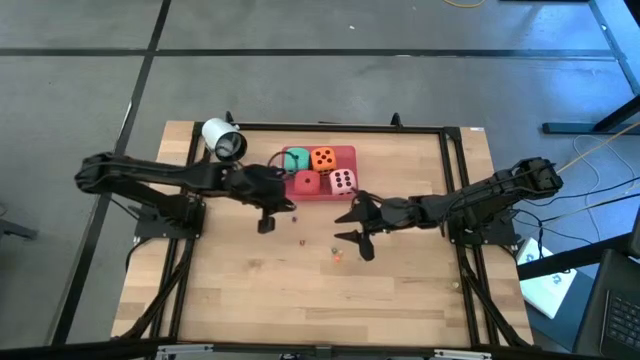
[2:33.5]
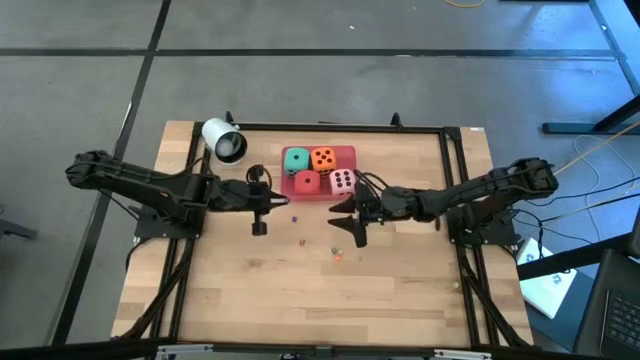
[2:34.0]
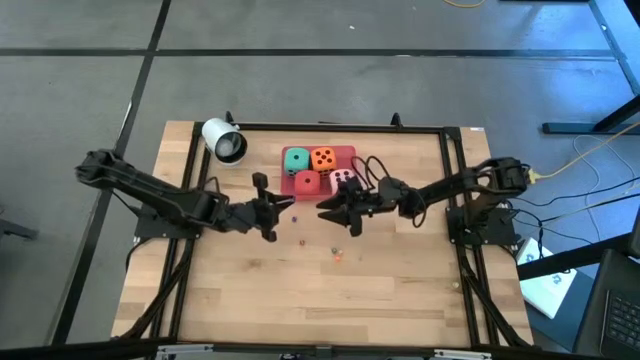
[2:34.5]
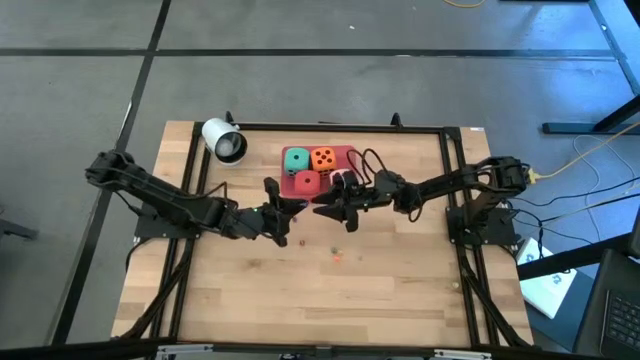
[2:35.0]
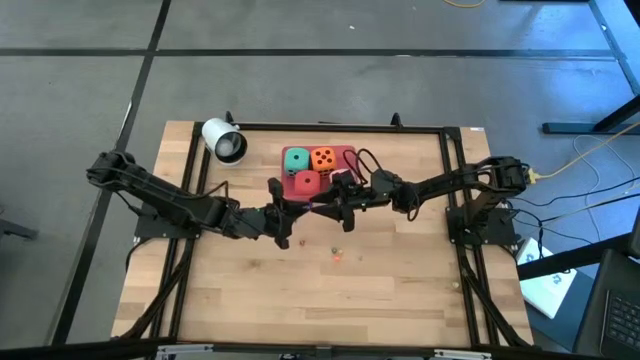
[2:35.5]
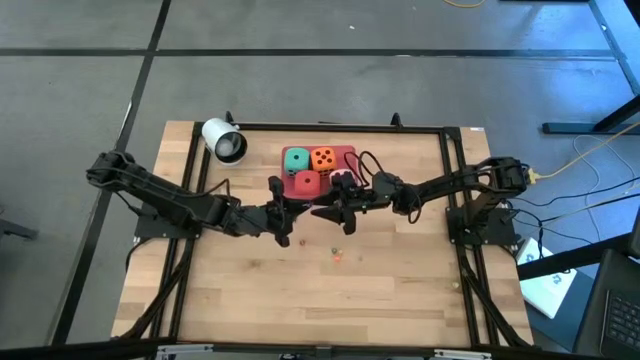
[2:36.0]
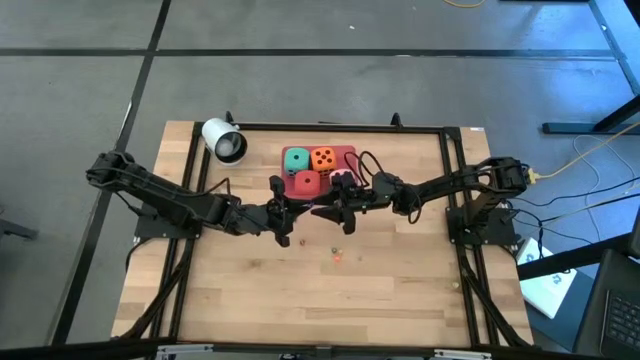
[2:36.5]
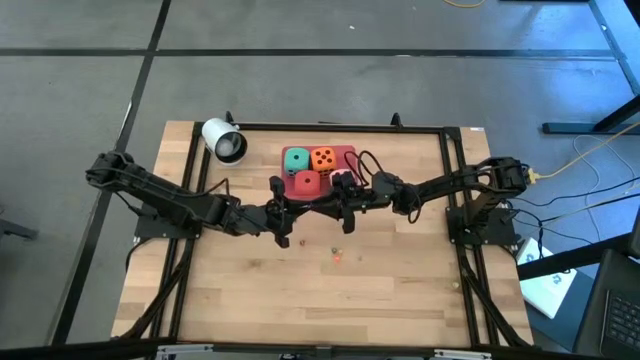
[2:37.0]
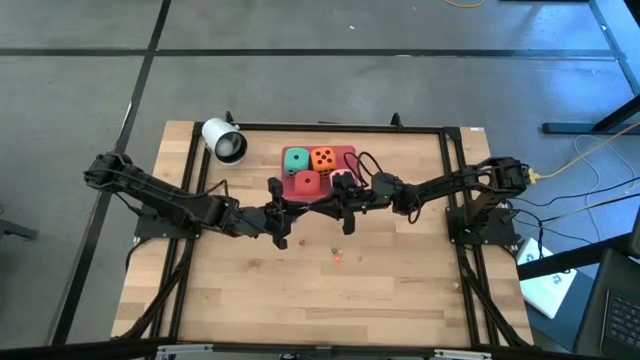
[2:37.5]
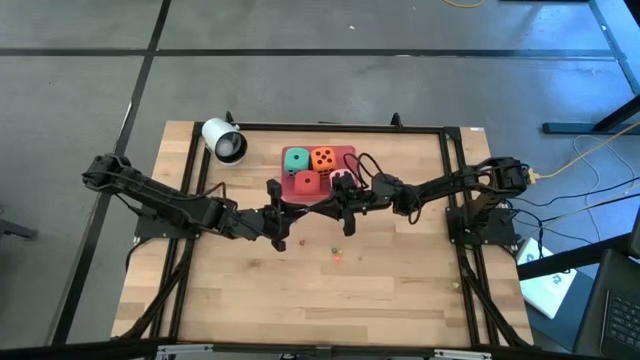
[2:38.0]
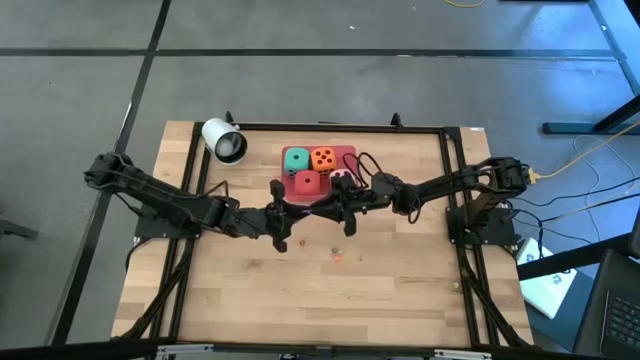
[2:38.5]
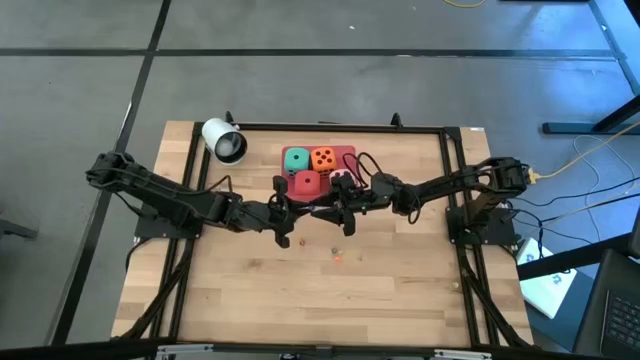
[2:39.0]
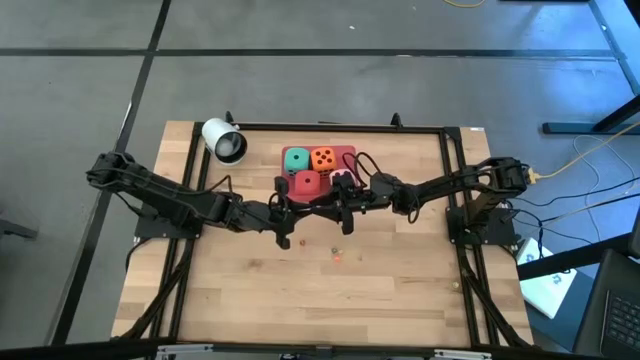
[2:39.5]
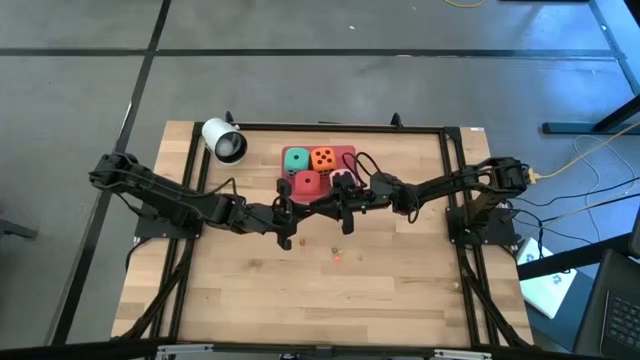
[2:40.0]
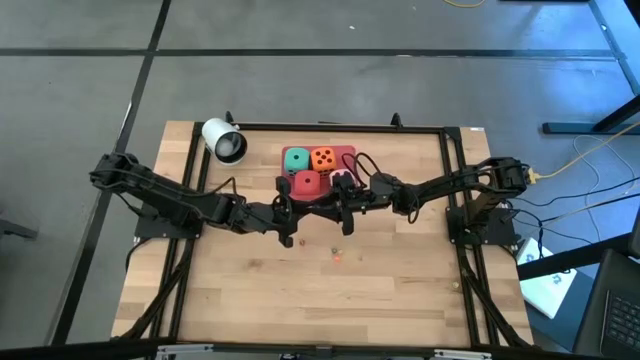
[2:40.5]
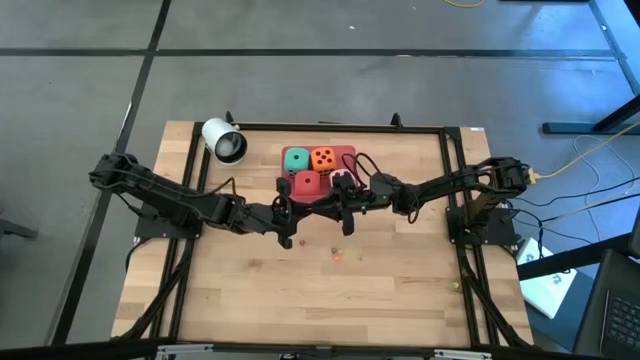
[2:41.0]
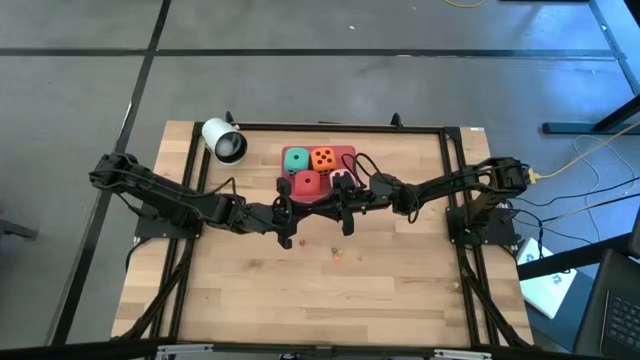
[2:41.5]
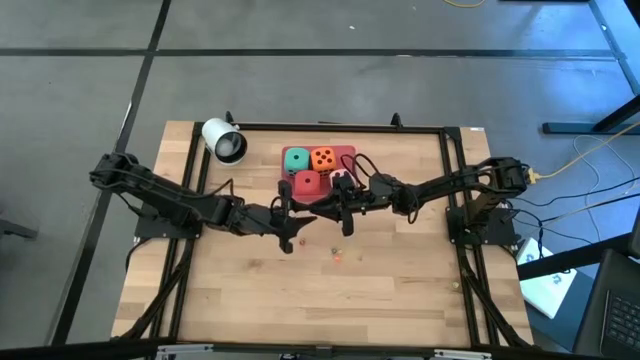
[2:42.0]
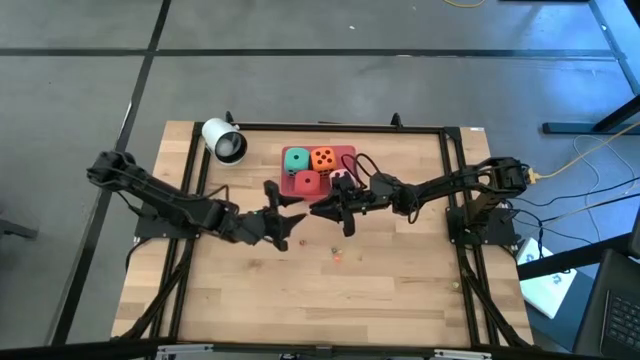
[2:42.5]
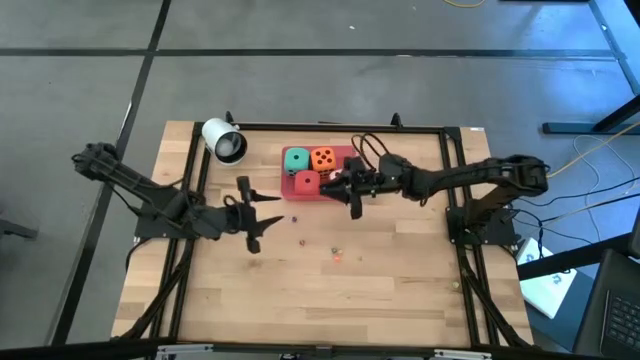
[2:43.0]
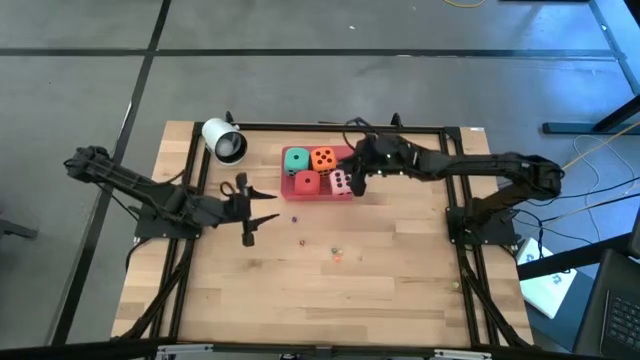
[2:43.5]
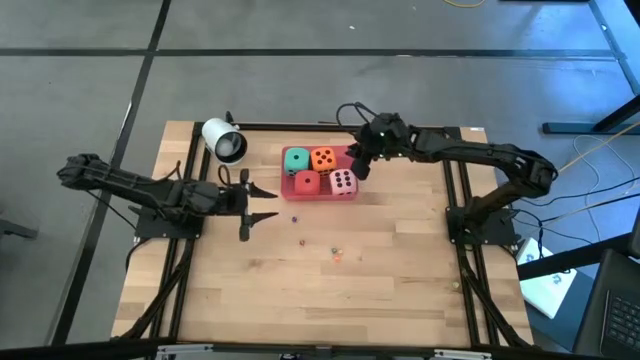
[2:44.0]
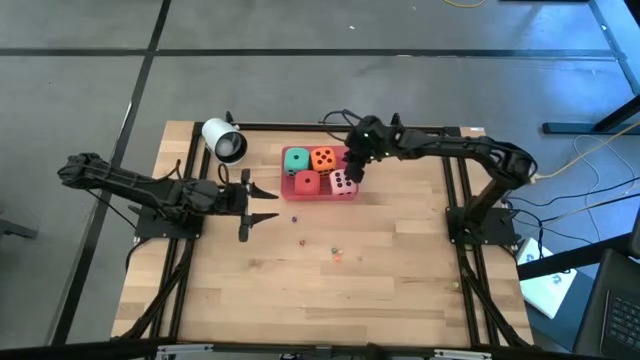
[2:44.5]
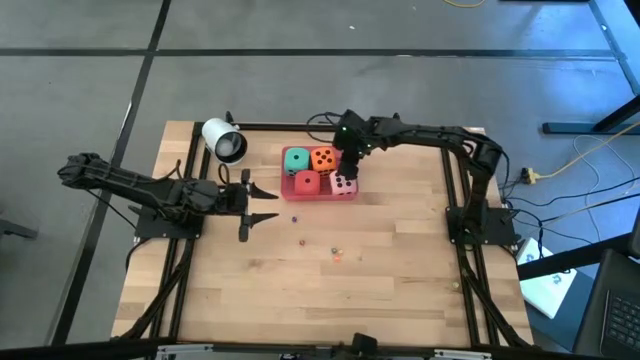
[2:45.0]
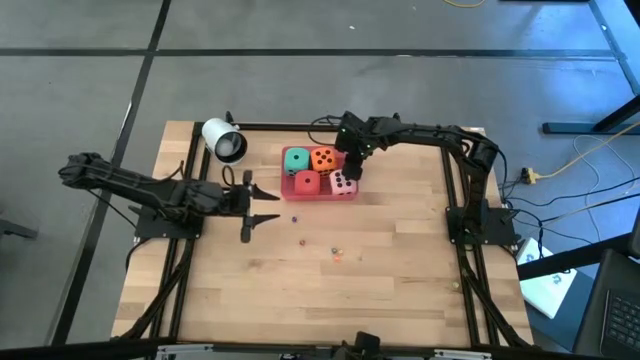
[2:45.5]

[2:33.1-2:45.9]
Task: Pick & Place Dice
Put the left small blue dice into the pink bin

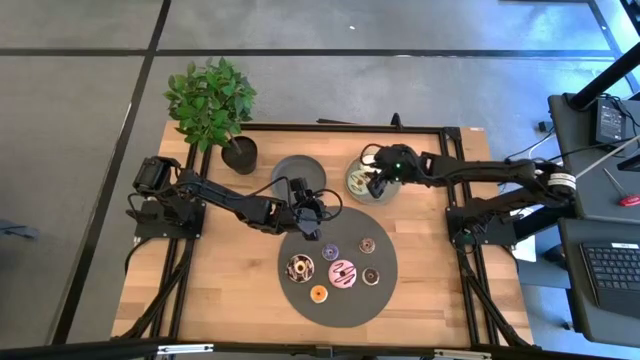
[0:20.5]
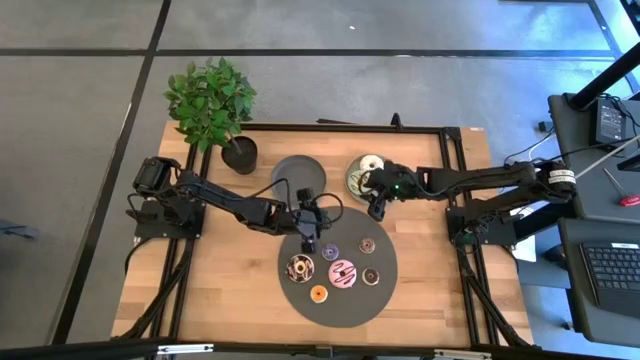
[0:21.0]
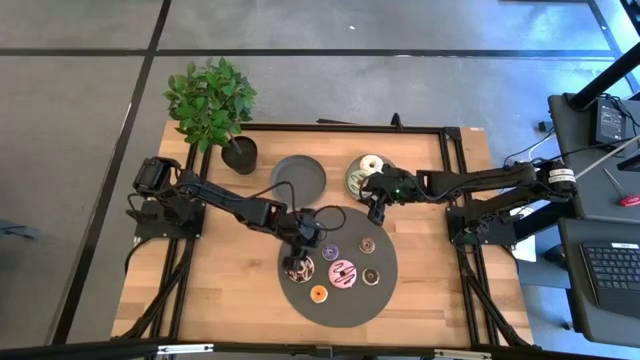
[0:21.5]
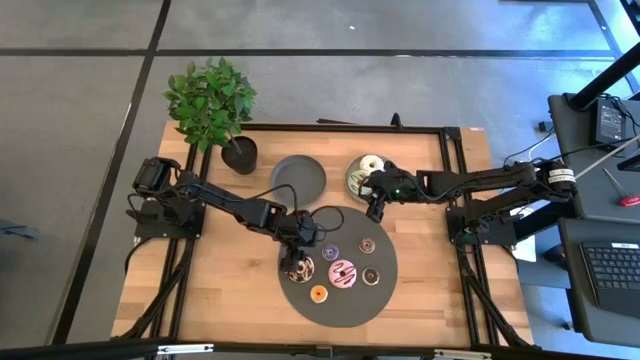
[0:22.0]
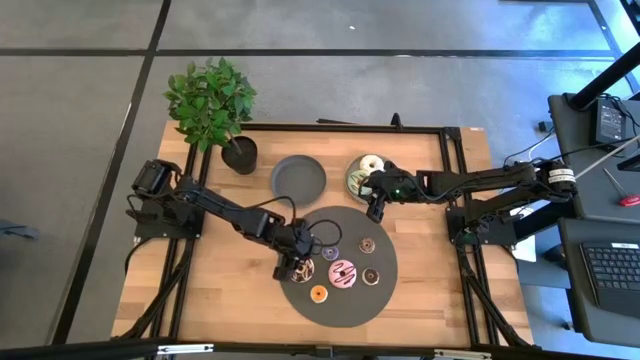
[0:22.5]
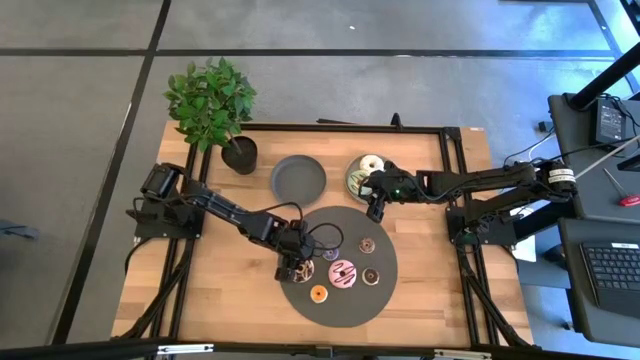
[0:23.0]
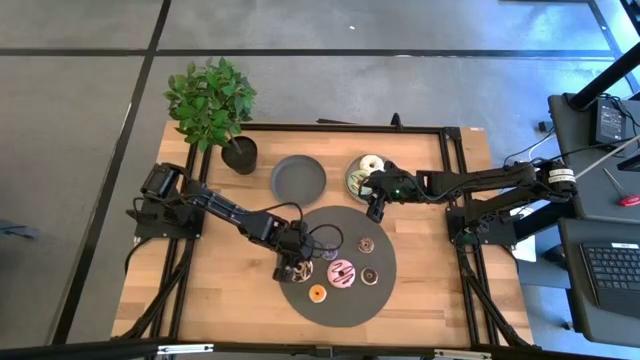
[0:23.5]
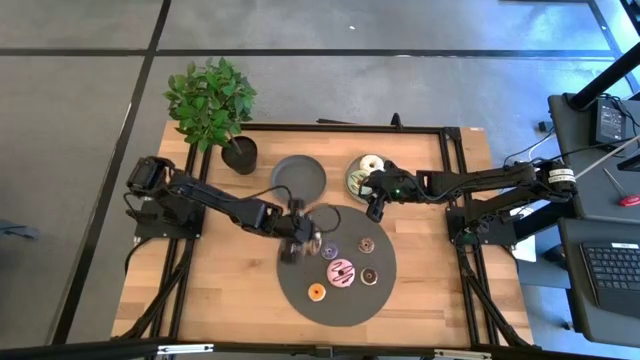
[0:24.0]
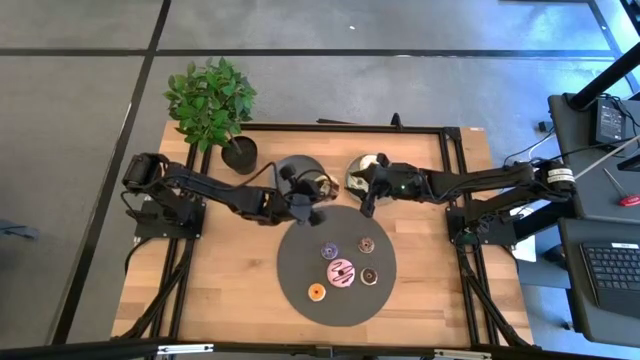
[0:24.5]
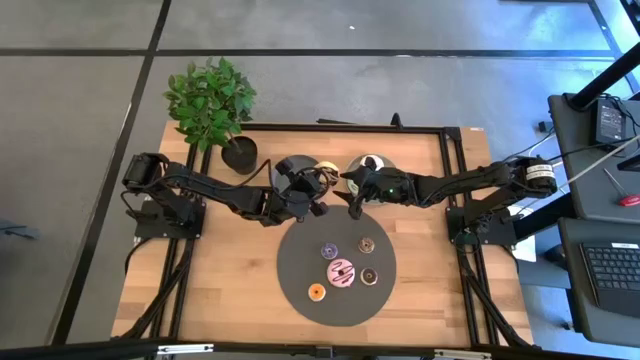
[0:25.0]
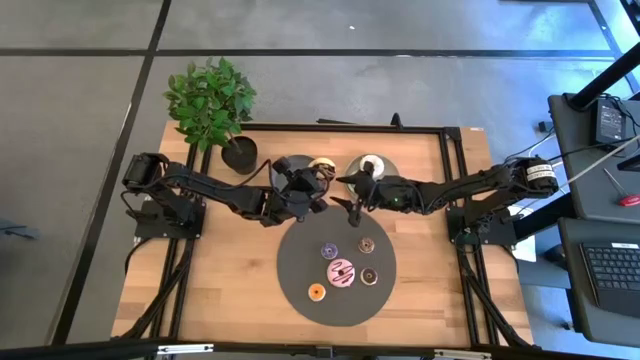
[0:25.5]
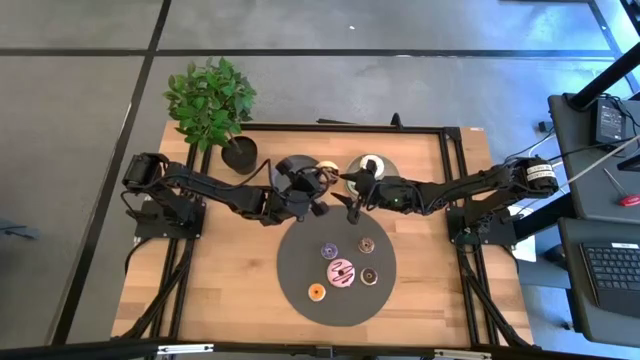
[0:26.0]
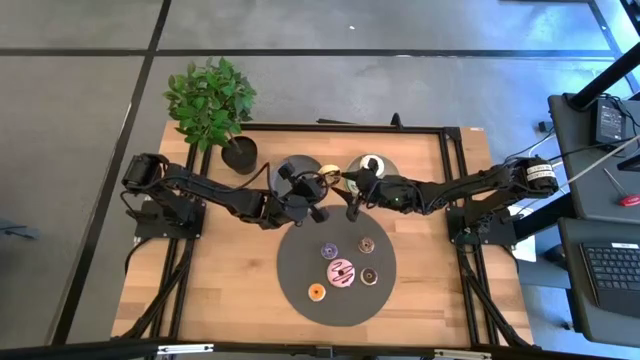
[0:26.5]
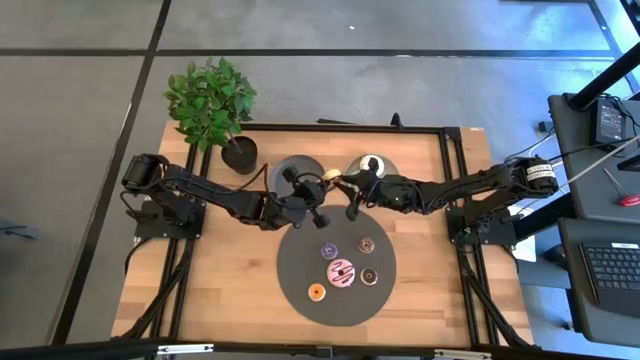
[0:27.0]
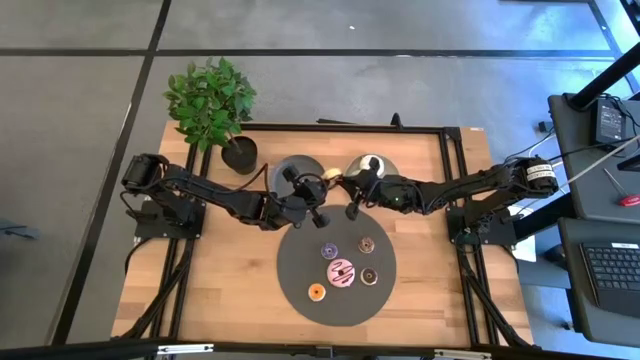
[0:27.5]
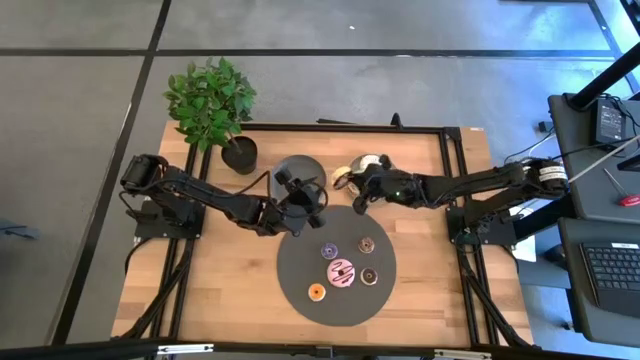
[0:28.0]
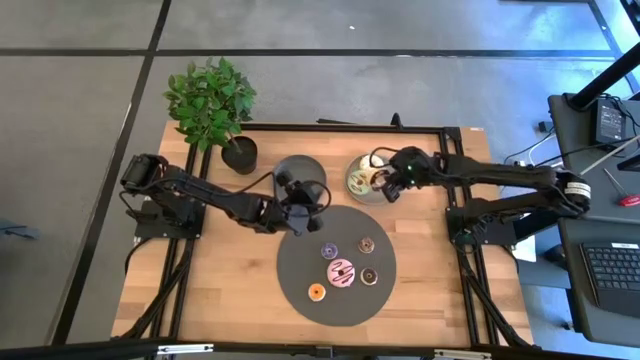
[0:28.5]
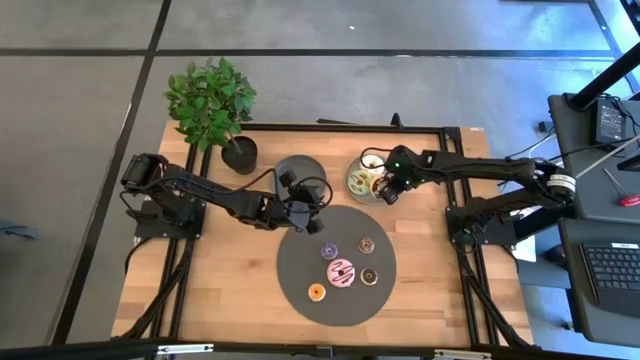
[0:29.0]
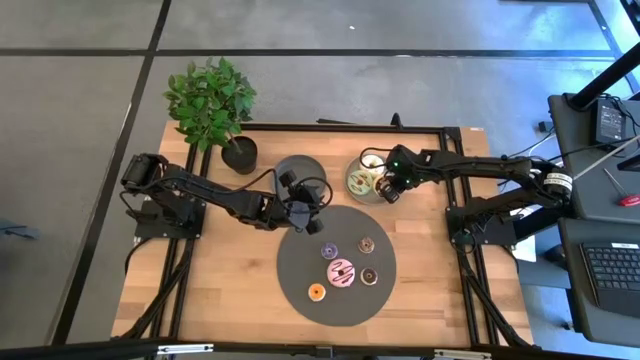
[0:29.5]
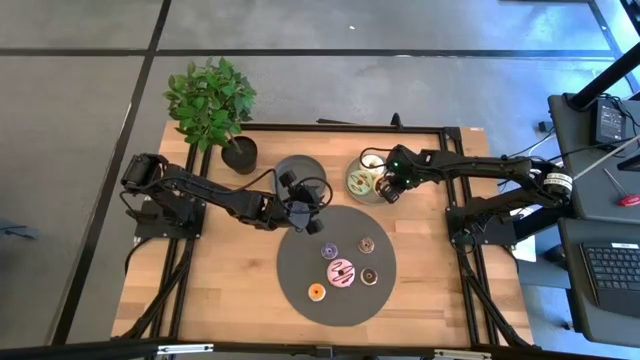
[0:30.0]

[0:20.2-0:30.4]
Task: Pick & Place donuts
Put the large black donut on the light gray plate
